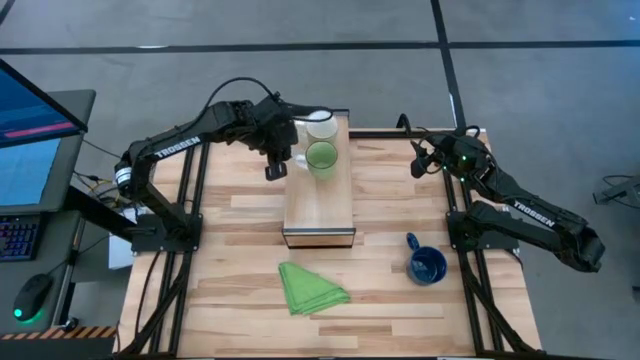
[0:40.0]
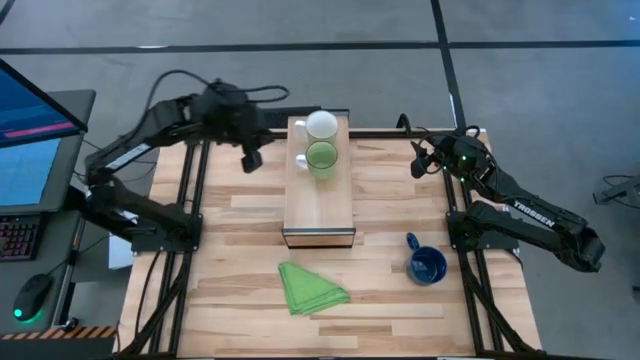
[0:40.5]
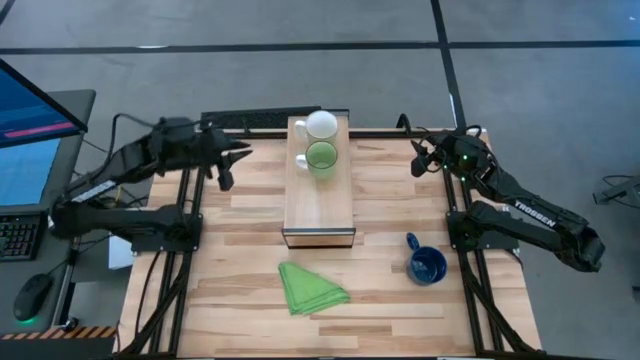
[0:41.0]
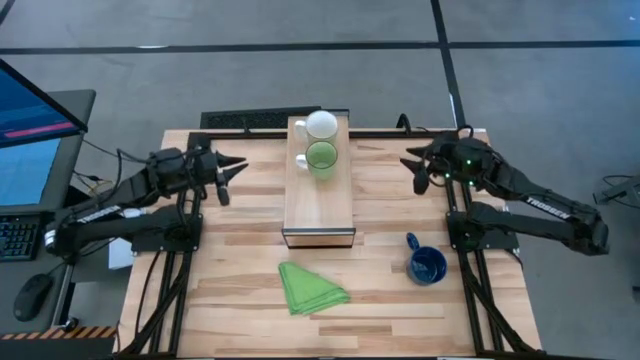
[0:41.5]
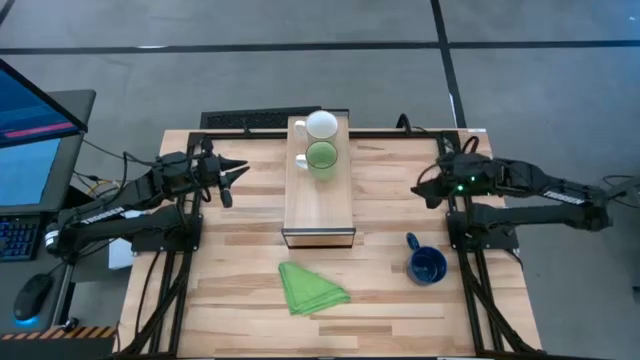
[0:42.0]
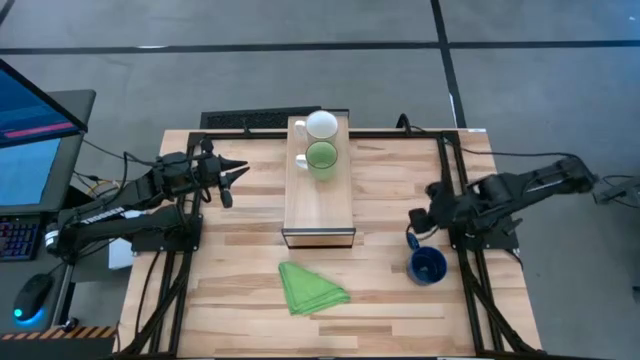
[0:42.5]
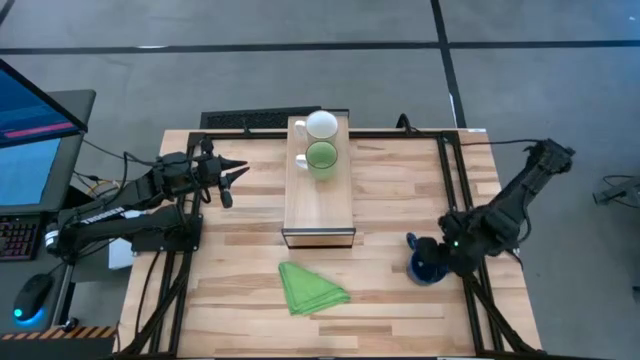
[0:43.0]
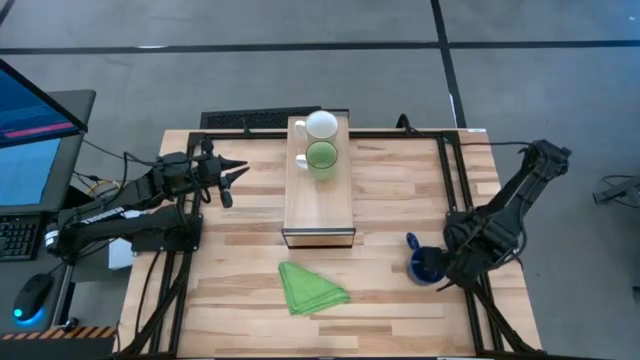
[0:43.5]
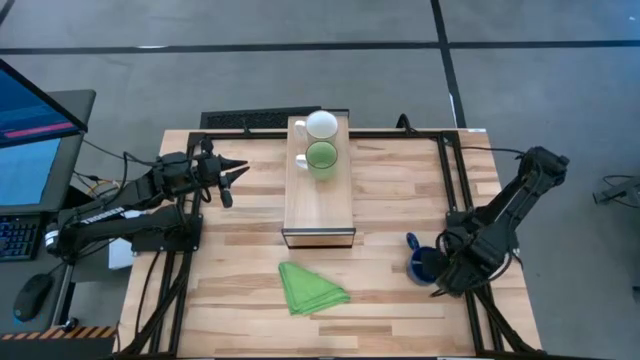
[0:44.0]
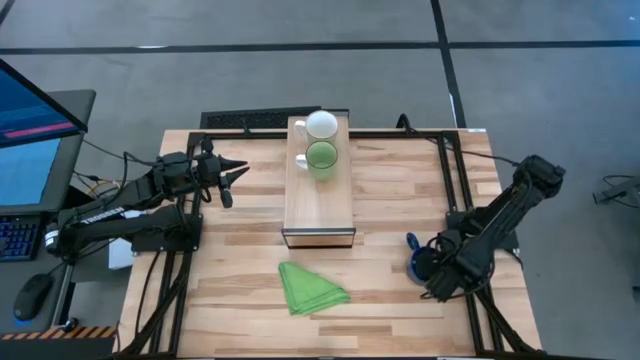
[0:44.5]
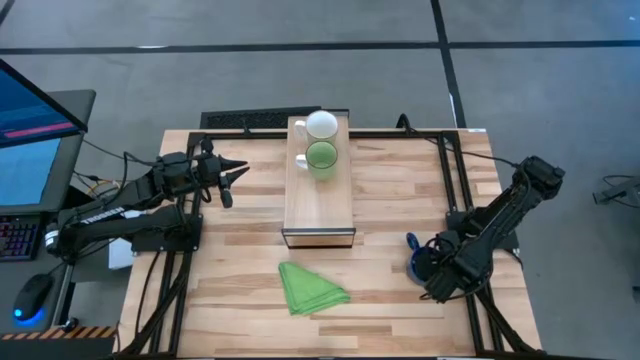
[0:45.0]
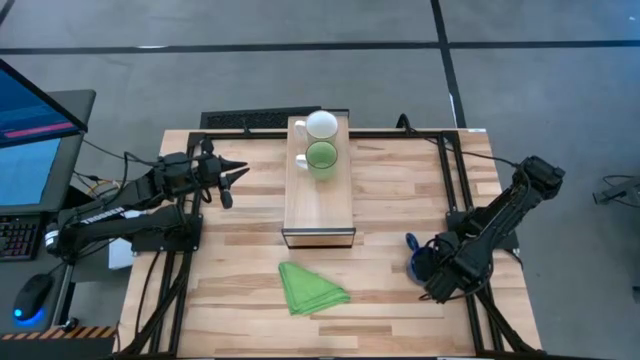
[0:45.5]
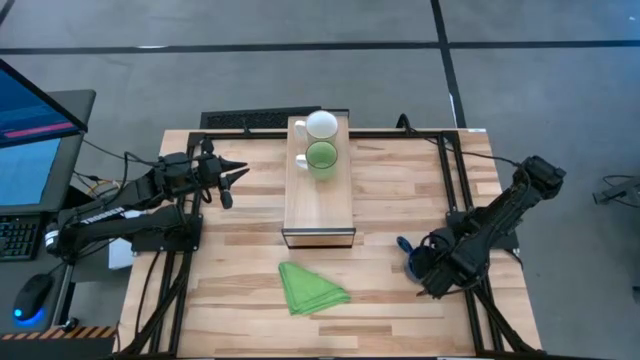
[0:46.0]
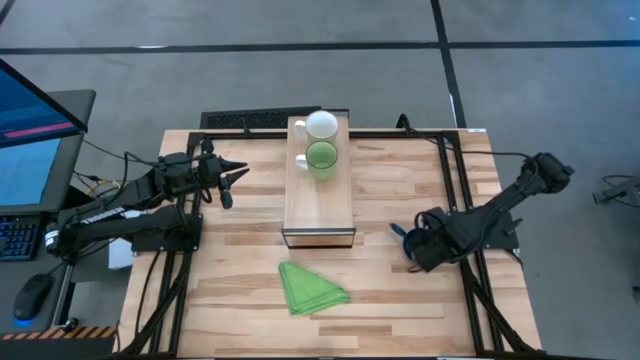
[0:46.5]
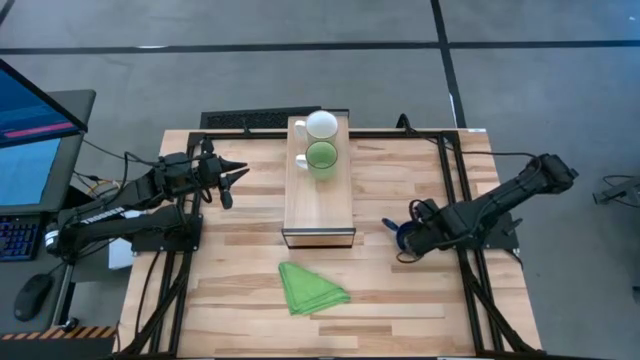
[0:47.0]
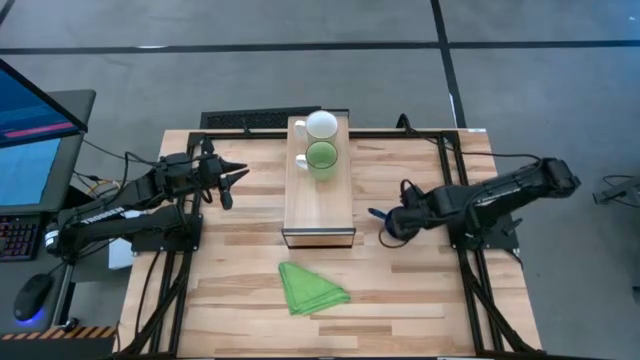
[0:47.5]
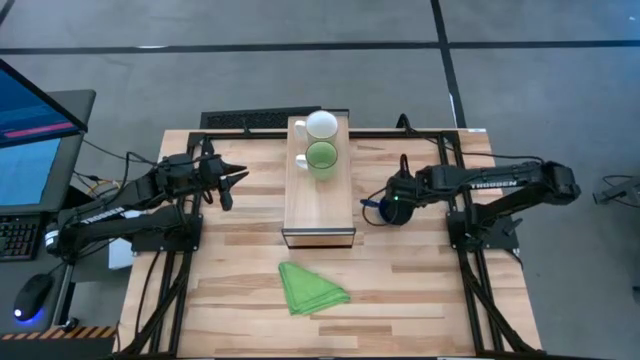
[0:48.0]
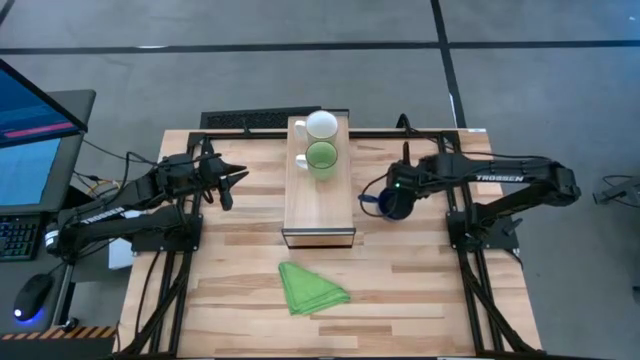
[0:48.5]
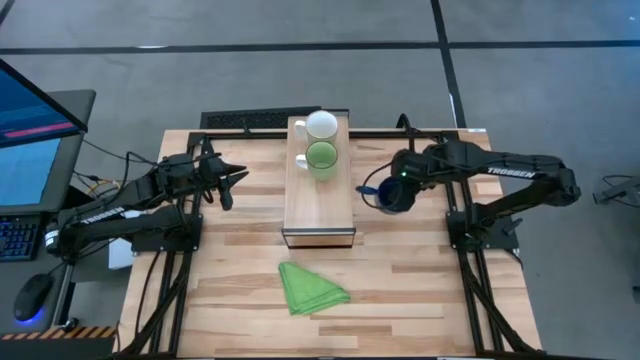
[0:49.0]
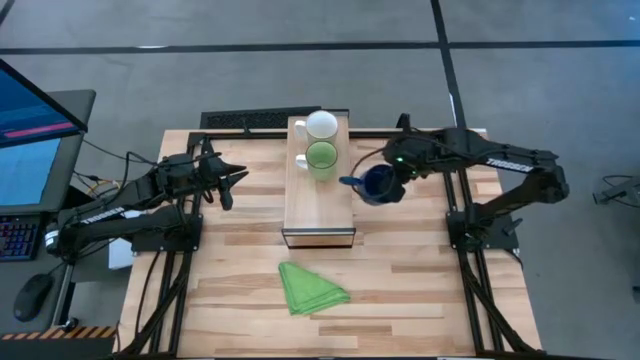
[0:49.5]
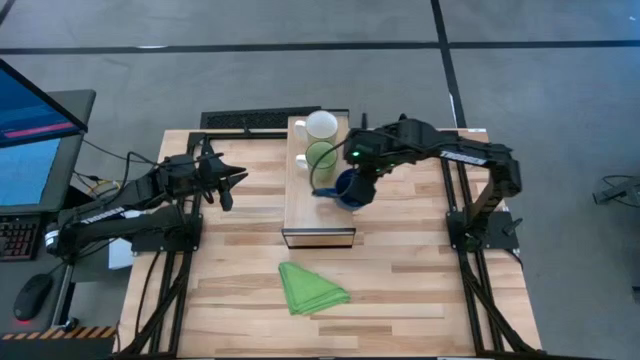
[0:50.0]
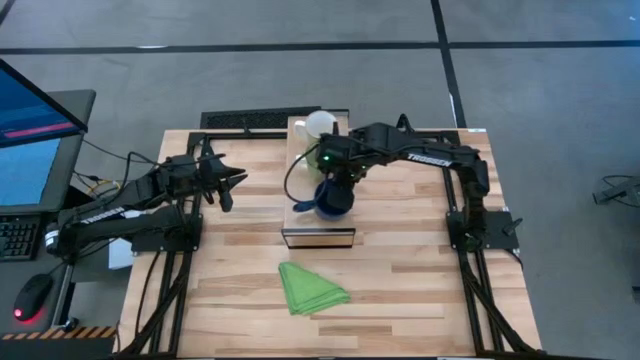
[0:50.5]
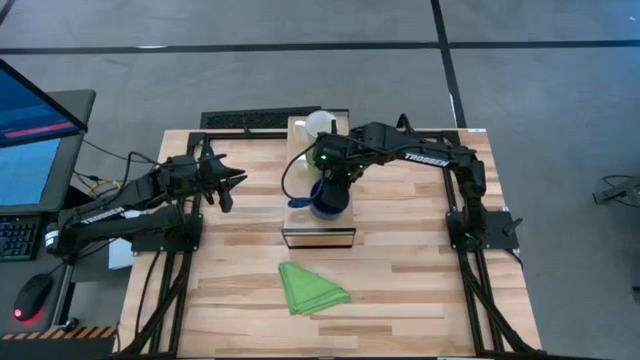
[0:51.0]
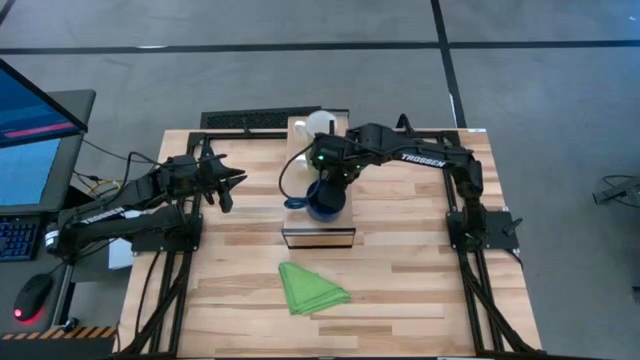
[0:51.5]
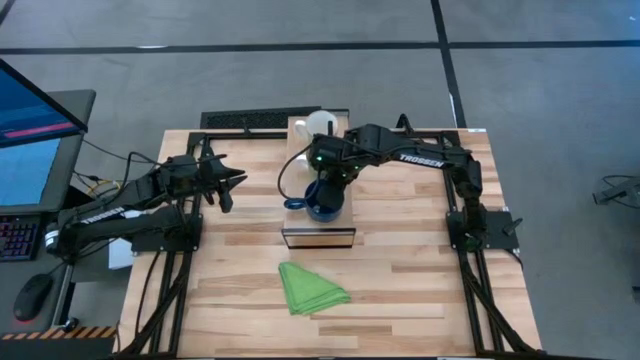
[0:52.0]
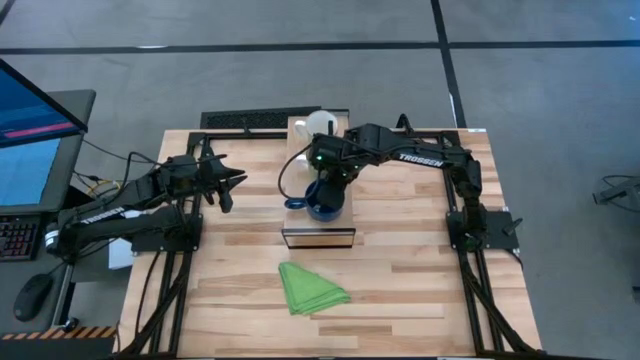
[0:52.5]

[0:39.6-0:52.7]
Task: Stack small to large cups/mugs on shelf
Put the blue mug on the shelf

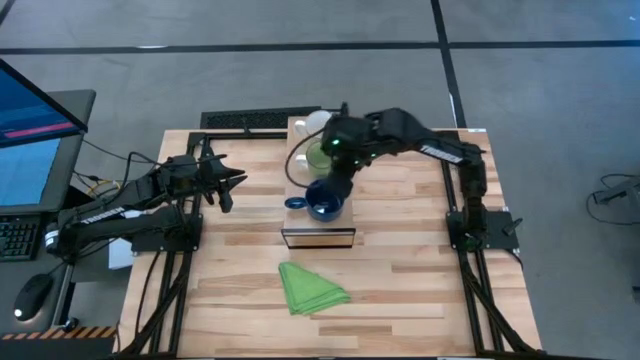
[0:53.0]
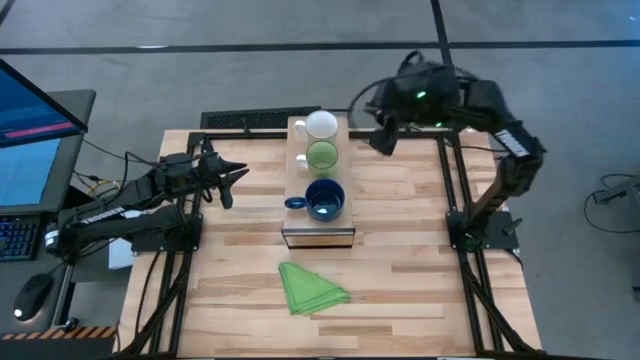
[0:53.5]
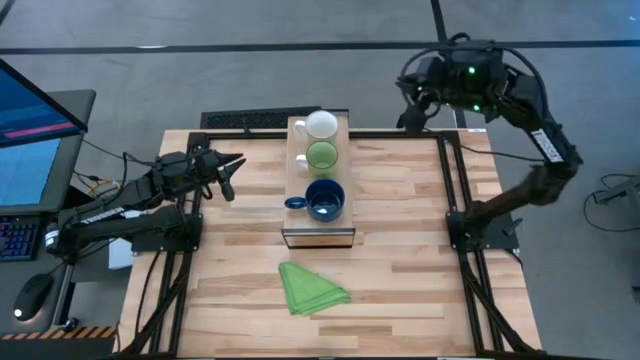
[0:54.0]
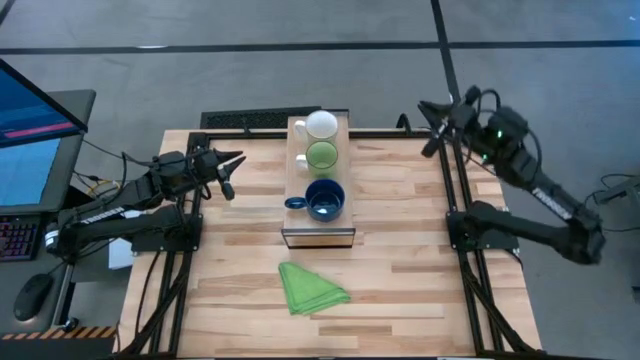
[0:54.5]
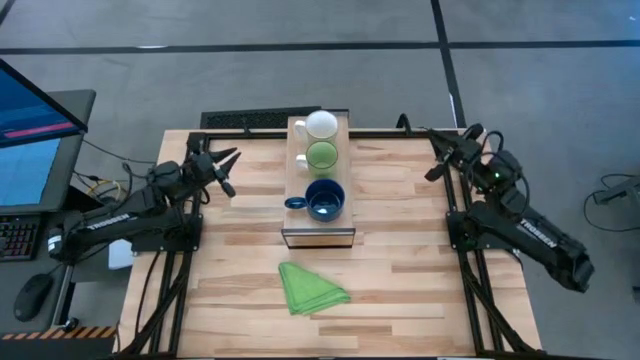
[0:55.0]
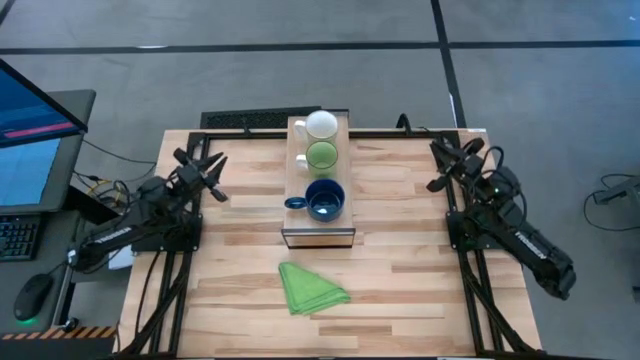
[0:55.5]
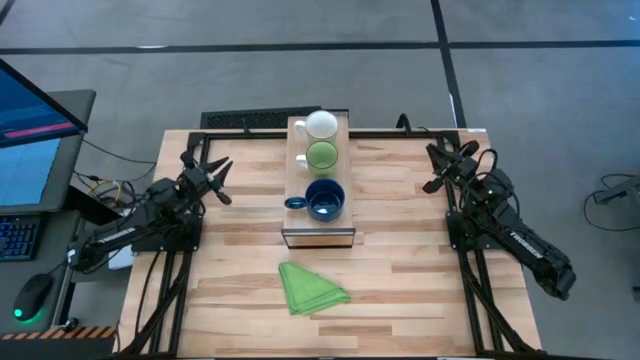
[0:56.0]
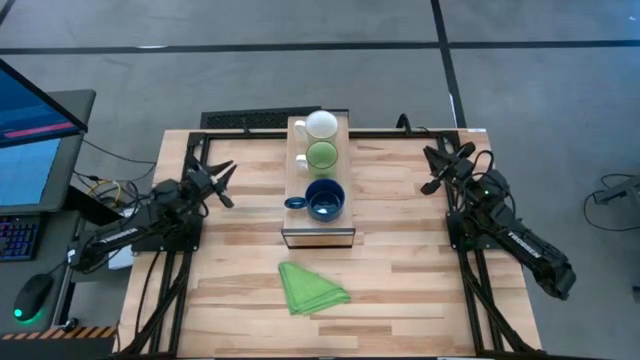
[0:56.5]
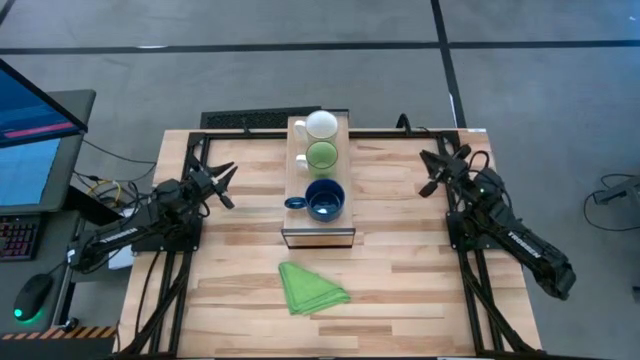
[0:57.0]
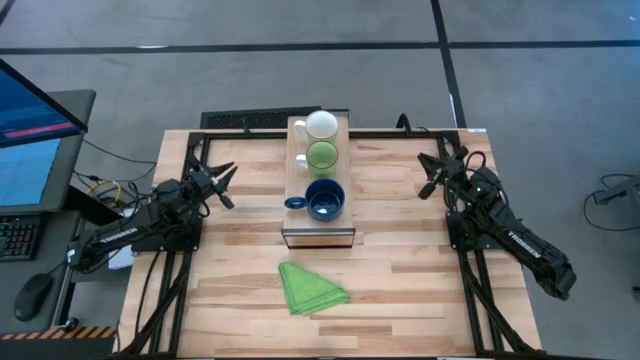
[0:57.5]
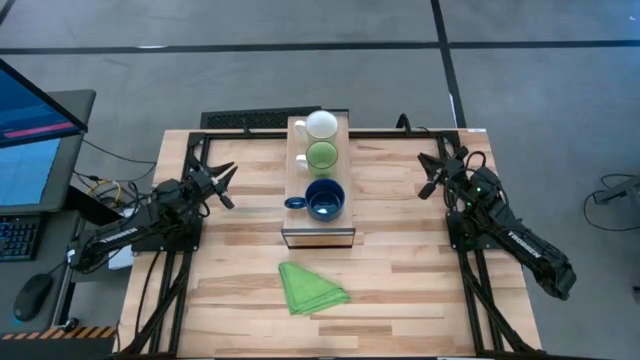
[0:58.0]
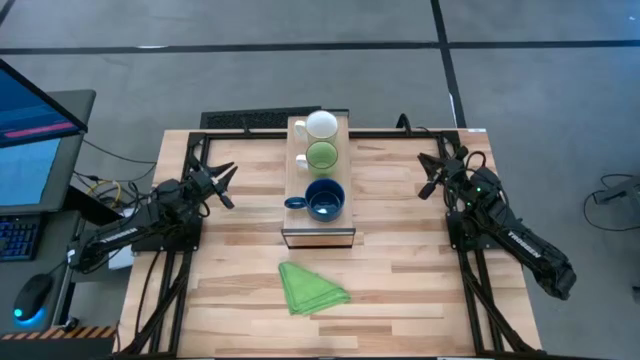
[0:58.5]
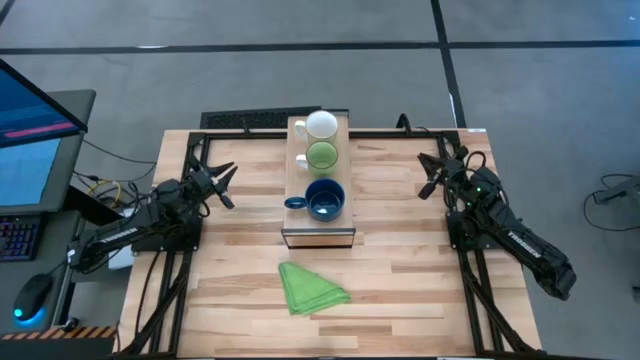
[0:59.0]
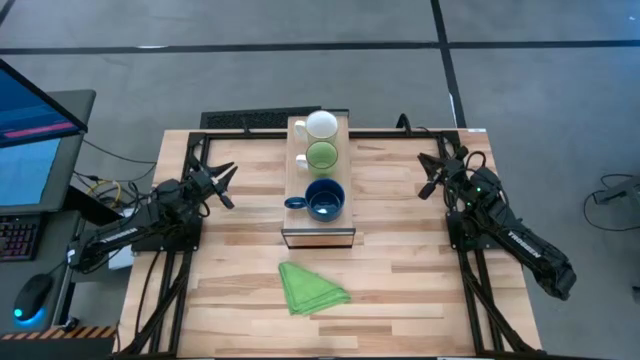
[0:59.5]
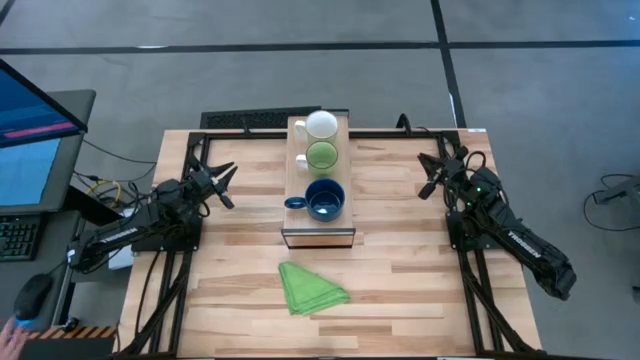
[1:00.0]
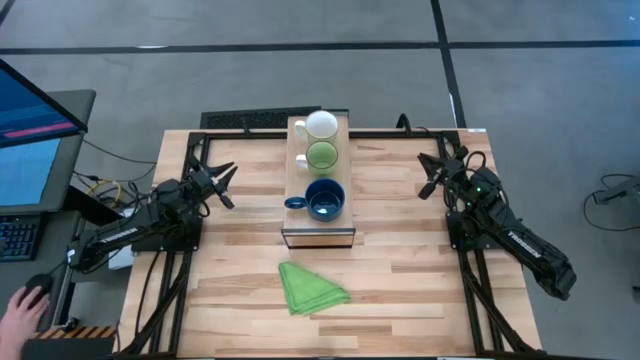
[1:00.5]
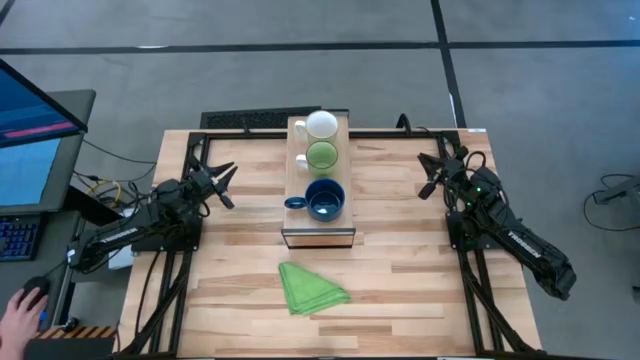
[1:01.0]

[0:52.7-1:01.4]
Return to Home Position
